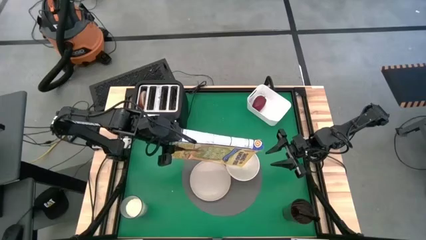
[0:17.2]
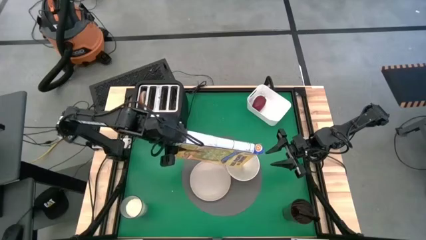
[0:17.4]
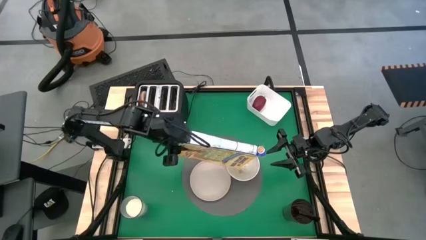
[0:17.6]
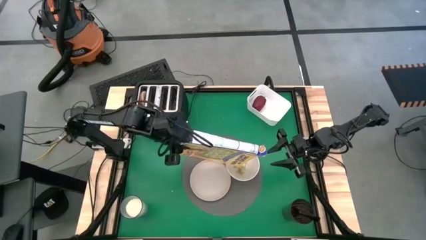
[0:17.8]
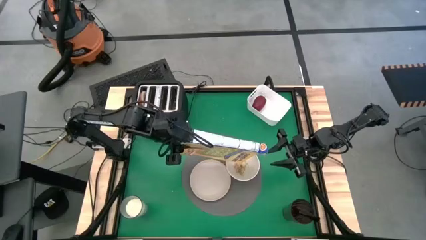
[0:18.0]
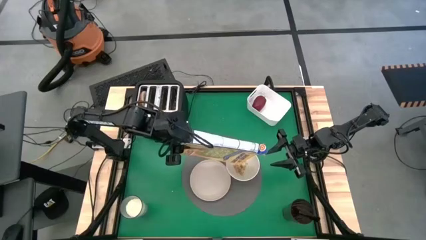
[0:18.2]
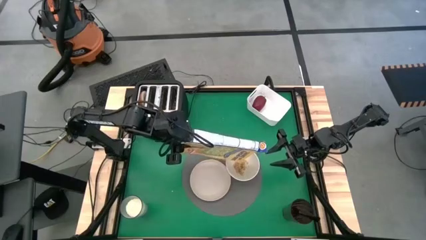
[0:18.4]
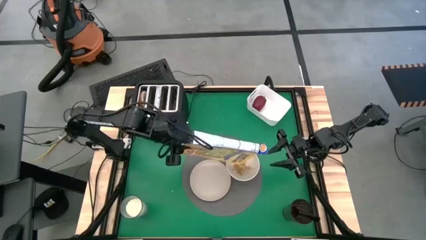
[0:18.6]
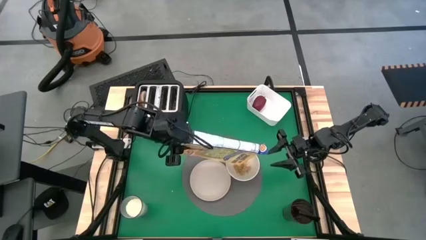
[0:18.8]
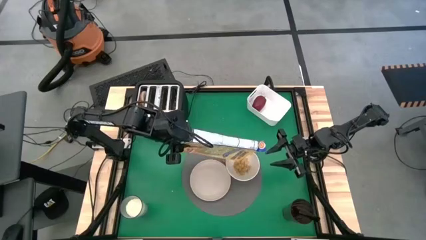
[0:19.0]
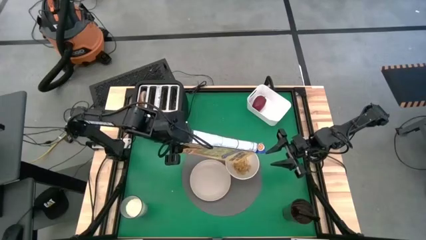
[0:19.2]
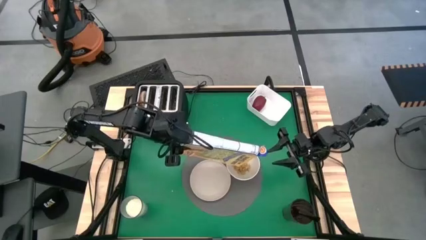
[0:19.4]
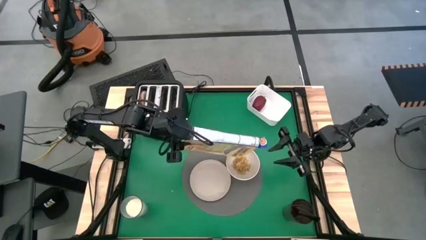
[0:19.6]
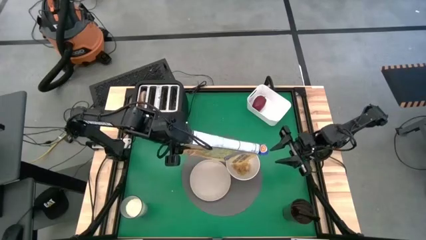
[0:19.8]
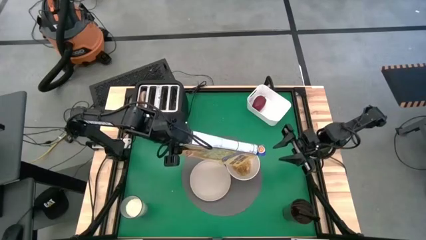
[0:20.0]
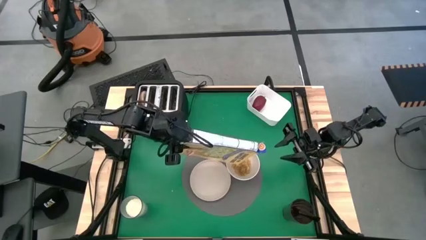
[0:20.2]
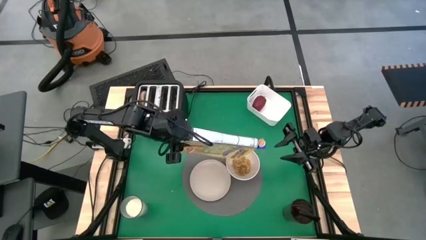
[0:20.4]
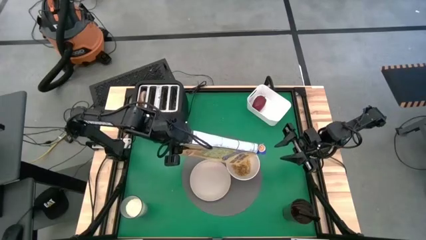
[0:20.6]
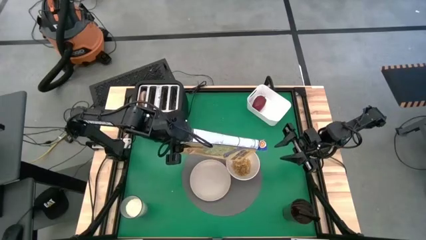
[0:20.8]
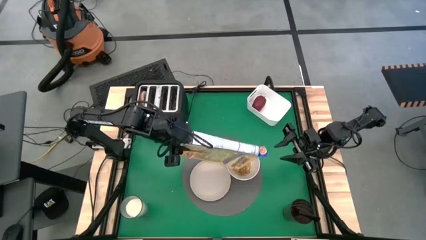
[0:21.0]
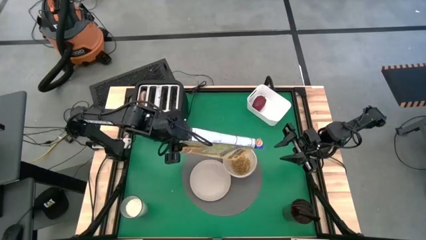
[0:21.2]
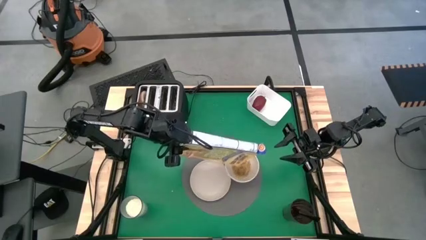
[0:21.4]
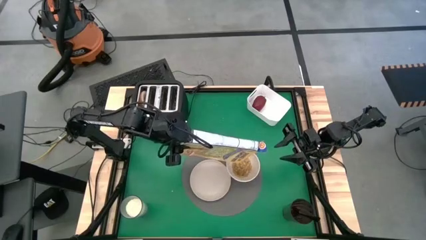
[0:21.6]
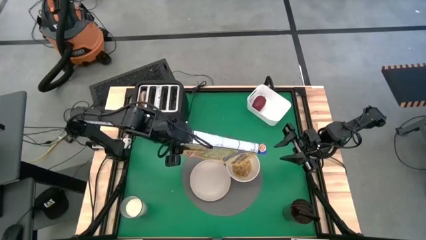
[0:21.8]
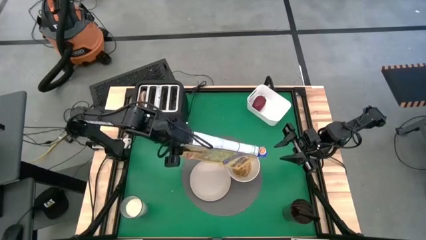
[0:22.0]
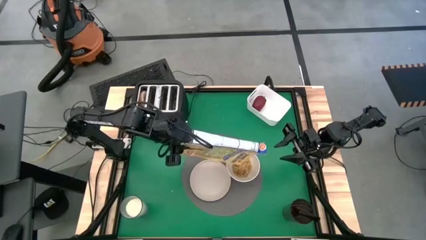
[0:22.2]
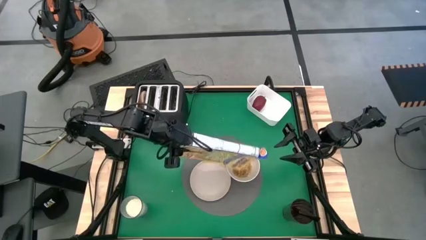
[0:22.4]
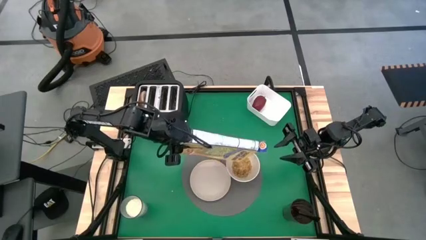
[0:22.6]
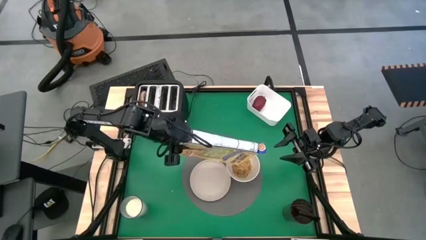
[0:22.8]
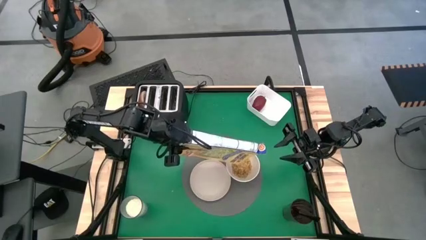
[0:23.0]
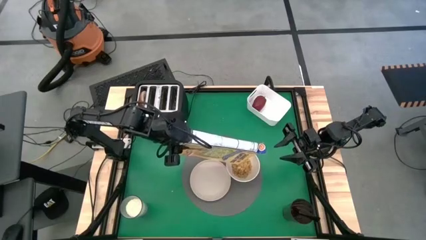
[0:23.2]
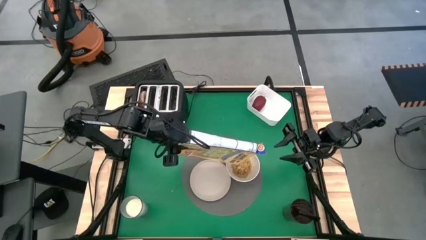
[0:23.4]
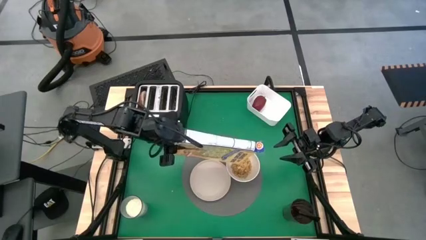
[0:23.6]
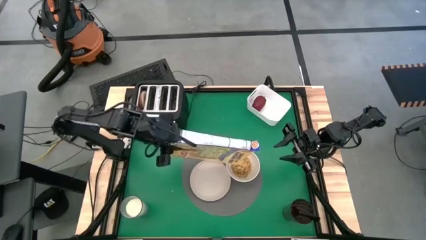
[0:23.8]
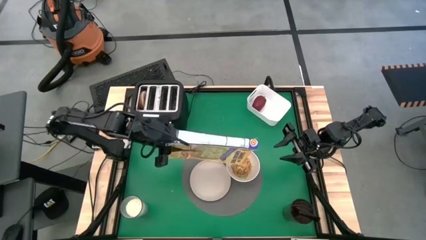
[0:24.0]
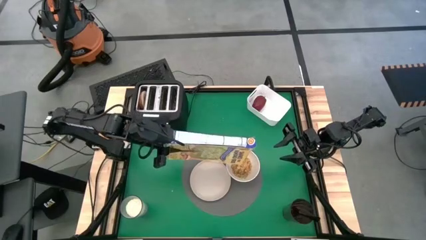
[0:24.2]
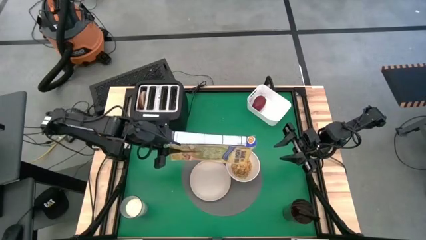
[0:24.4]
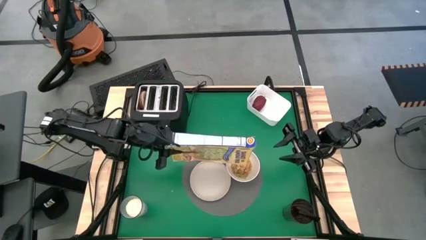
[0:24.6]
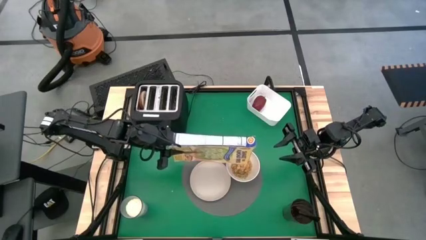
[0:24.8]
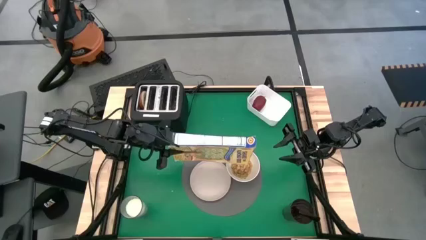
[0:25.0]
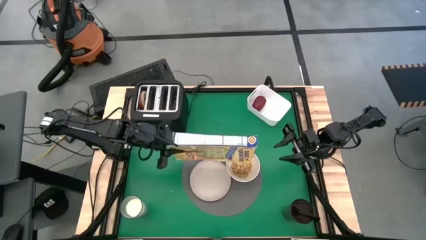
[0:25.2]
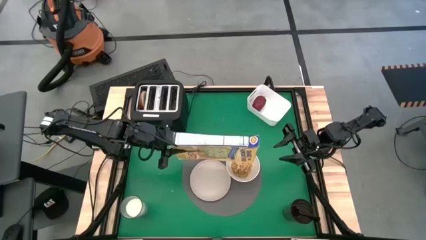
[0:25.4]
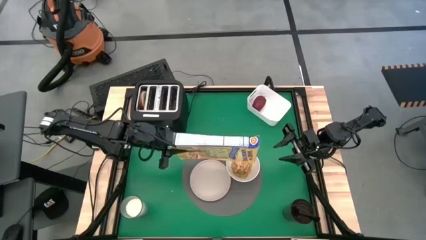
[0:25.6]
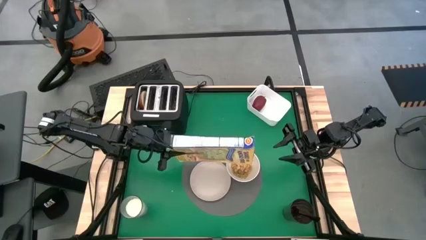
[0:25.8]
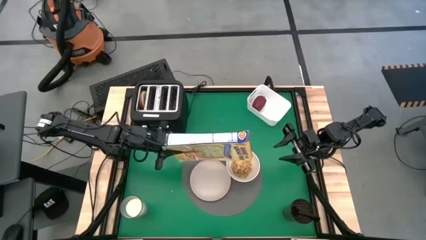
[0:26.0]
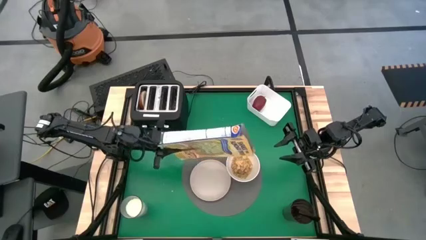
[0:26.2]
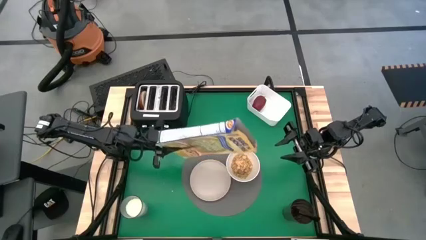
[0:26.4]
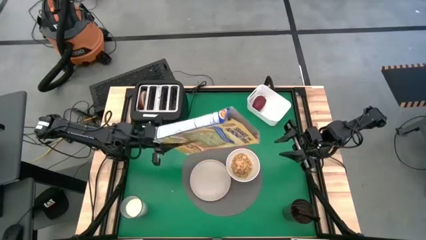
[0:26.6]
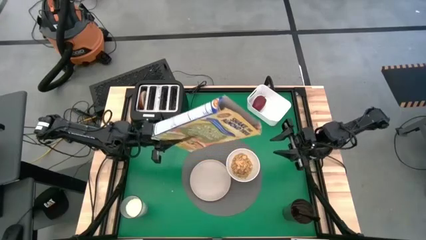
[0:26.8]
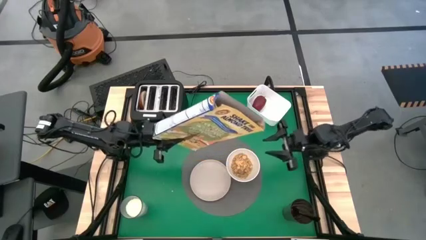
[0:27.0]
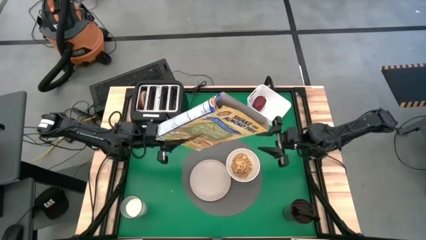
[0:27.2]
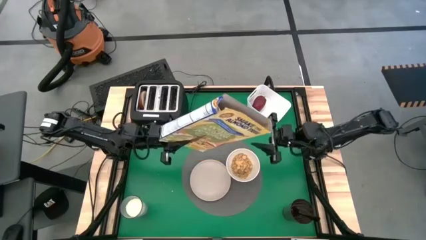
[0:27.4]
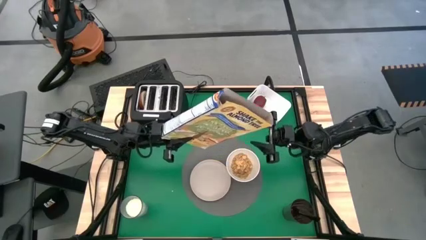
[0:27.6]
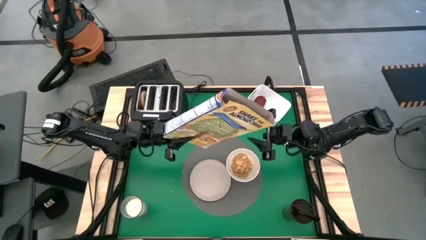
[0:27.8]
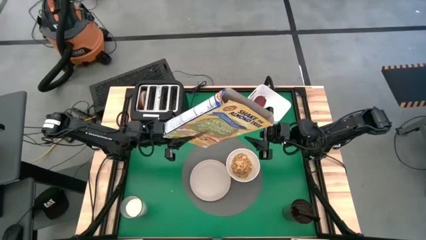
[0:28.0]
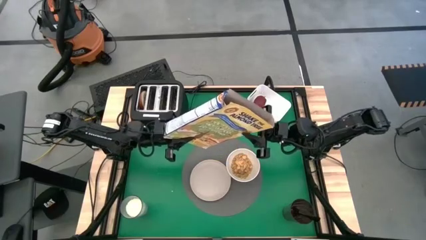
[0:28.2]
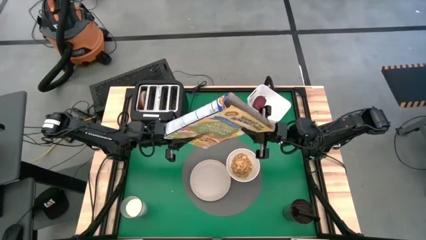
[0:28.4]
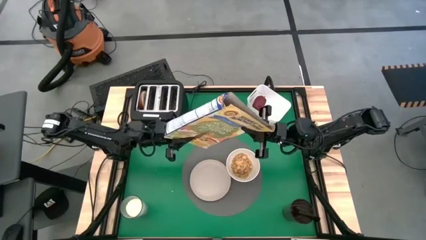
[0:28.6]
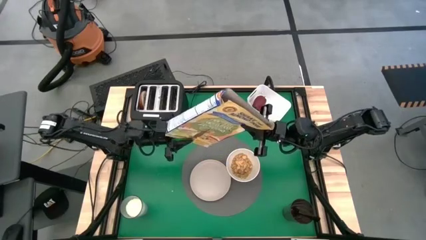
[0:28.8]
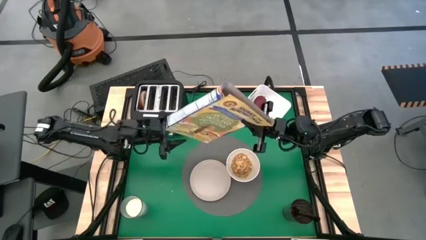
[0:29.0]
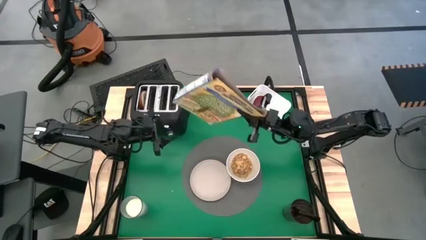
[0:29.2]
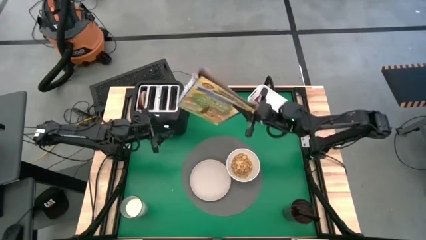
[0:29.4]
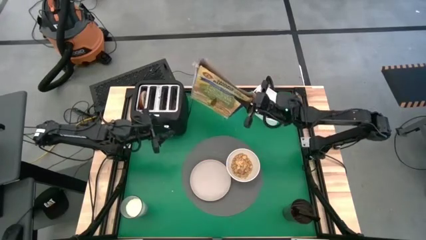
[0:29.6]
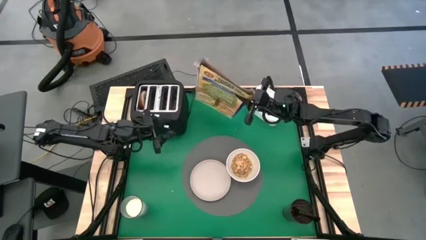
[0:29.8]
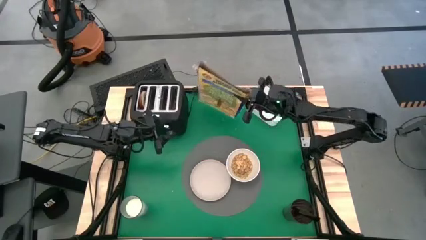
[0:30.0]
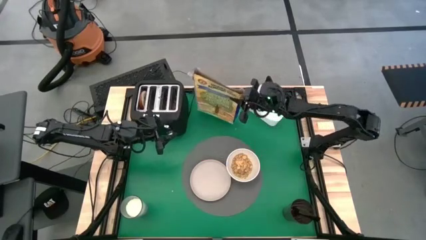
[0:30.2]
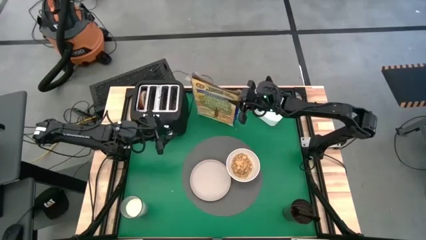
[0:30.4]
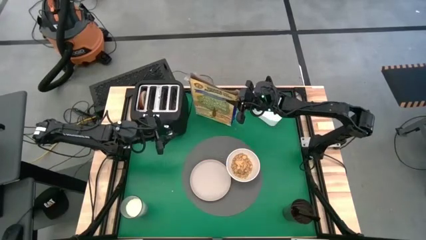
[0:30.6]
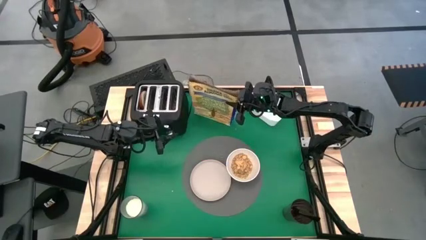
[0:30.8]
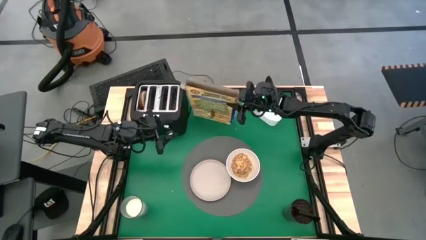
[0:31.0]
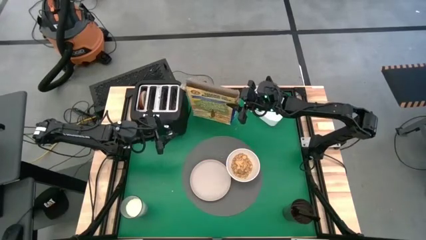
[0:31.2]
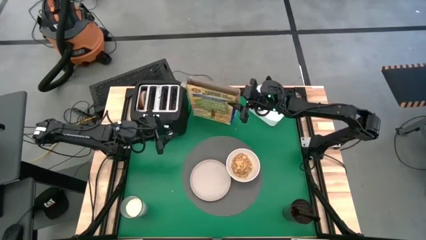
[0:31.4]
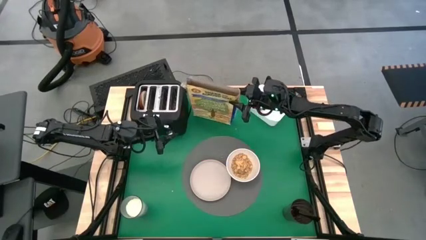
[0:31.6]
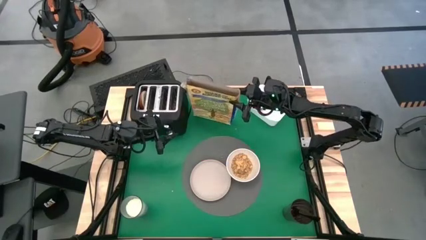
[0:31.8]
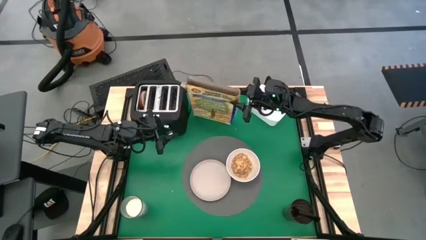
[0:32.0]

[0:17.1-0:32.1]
Task: Arrange a breakfast setting
Pour the cereal into the white bowl
